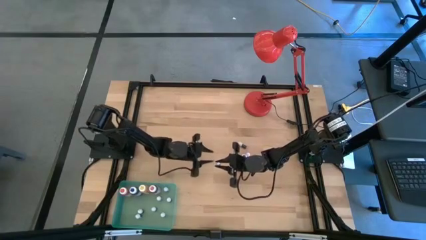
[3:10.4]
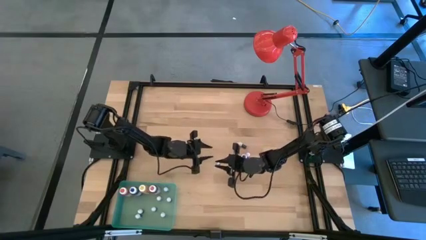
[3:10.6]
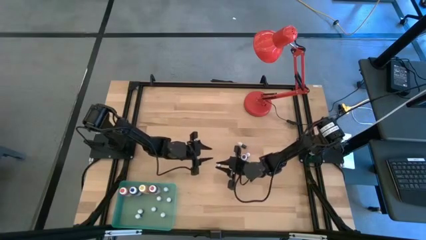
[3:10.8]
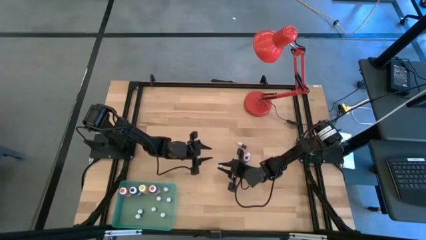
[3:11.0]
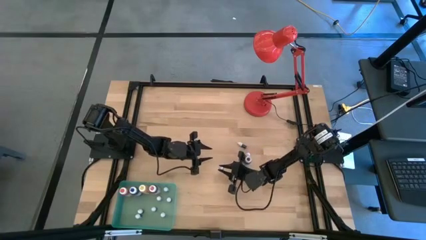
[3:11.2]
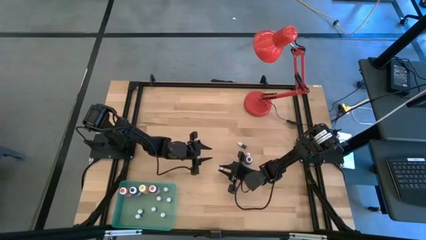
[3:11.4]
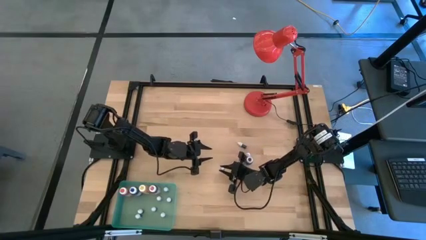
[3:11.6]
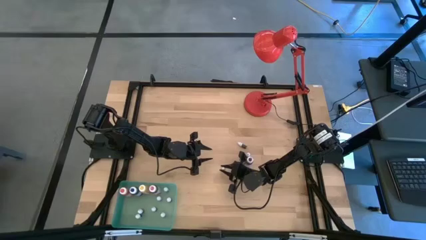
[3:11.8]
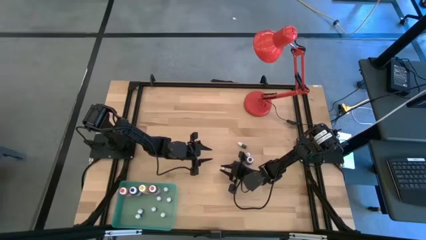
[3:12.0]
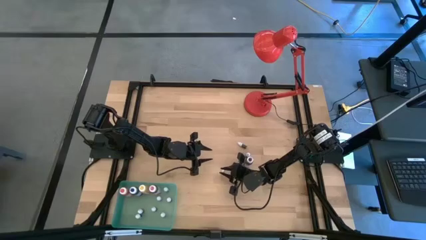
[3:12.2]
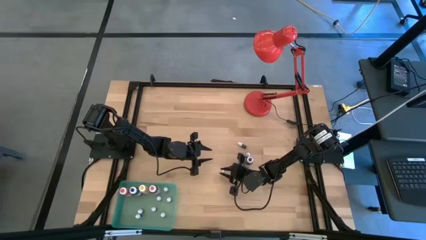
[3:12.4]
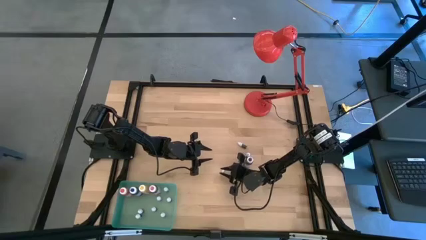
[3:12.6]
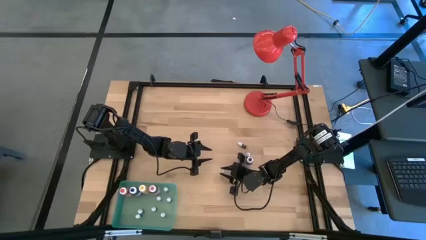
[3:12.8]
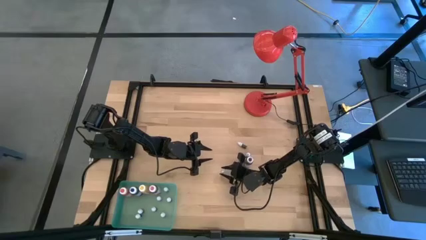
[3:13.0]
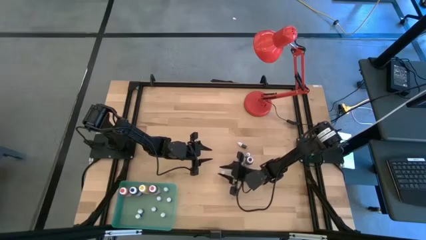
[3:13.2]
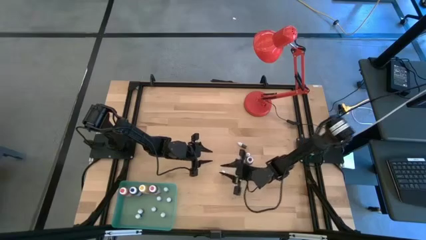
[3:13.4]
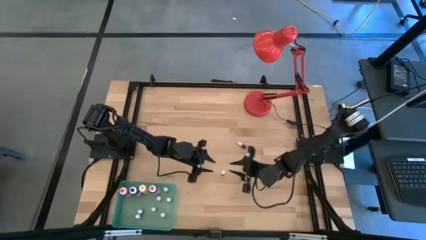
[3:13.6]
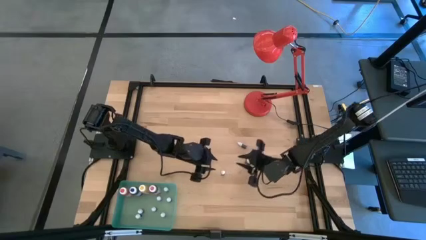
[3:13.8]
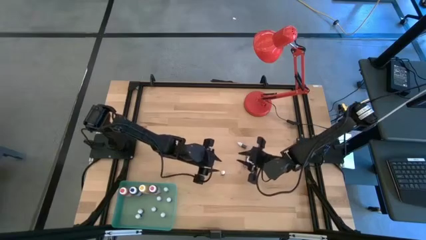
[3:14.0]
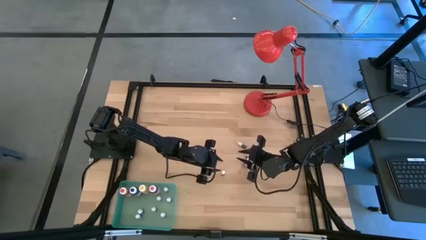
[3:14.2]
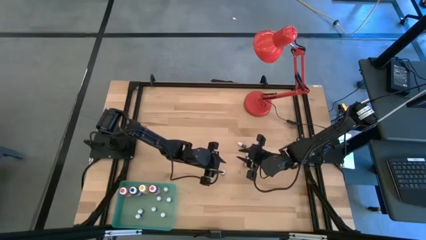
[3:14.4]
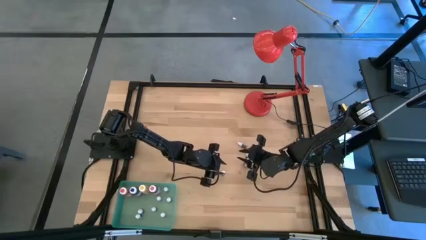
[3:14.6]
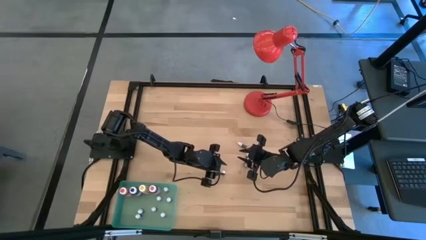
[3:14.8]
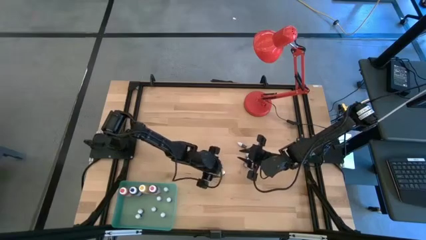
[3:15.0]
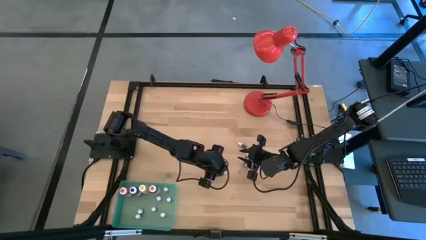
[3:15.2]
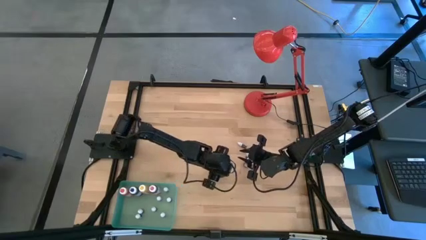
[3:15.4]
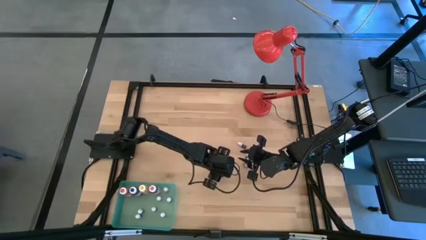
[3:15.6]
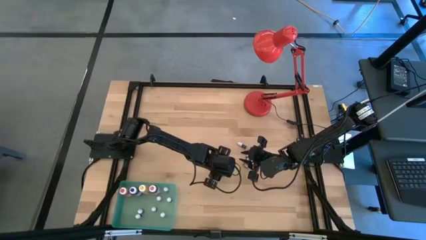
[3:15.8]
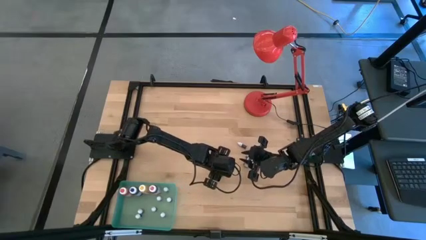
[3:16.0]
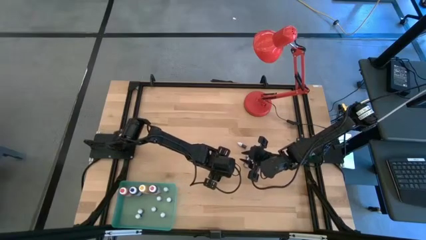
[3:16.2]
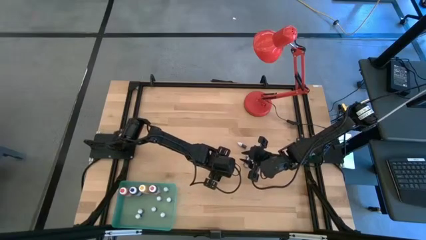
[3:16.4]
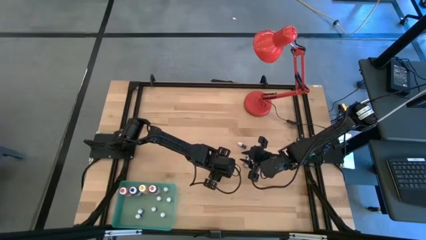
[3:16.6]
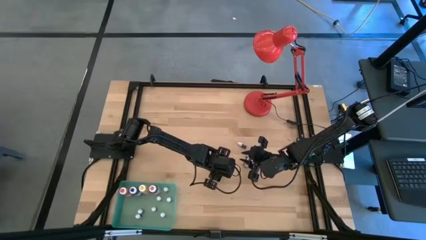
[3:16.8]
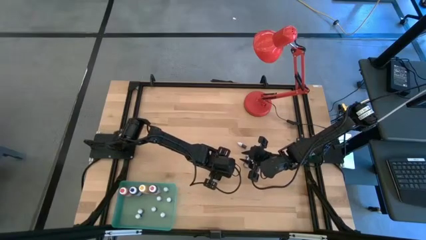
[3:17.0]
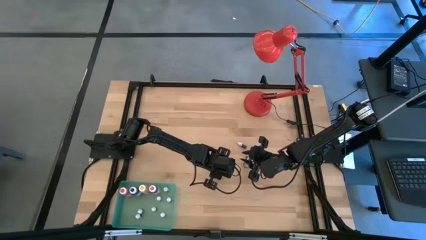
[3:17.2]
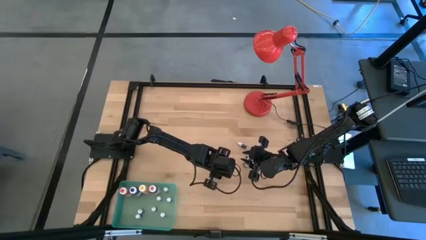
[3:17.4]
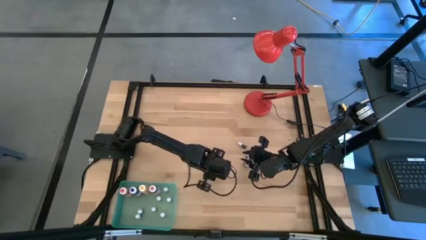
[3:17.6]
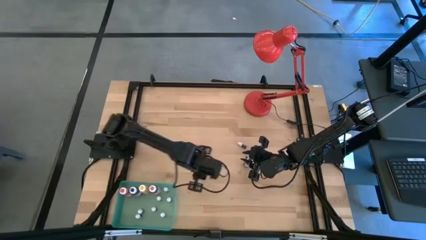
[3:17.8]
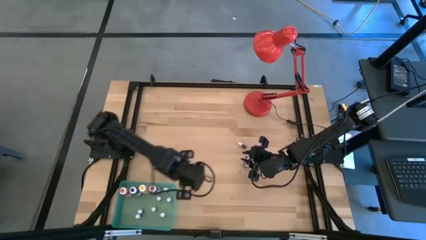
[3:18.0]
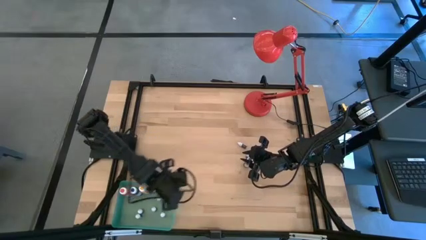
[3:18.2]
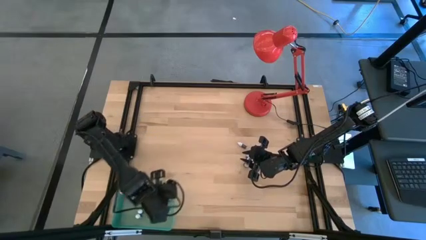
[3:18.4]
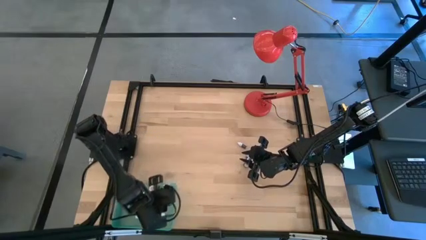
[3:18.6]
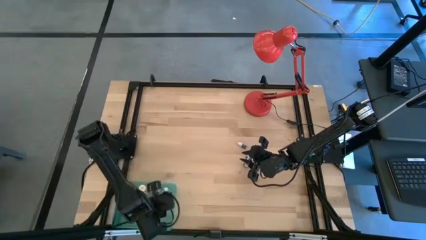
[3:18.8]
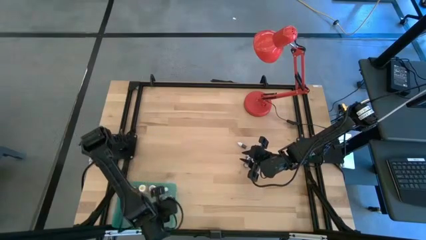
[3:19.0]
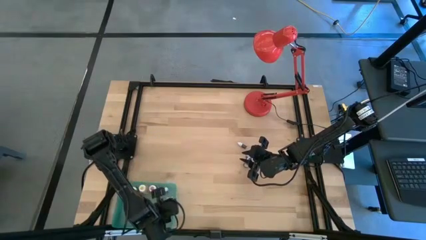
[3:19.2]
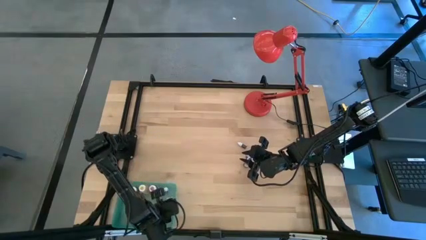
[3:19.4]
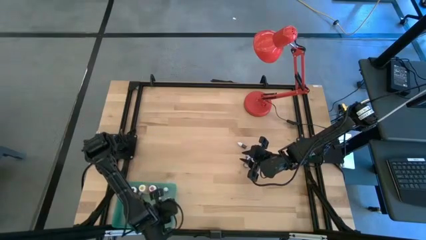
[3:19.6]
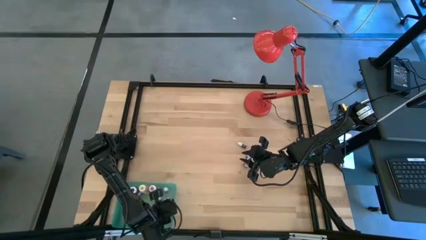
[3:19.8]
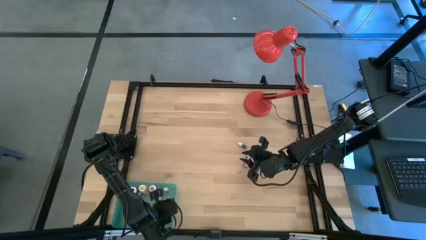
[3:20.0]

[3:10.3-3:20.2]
Task: Pick & Place food coloring
Put the green food coloring into the blue bin
